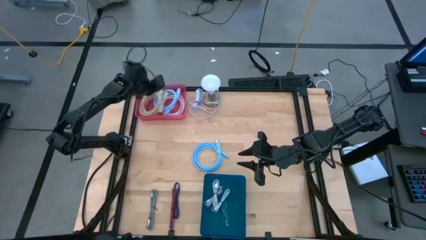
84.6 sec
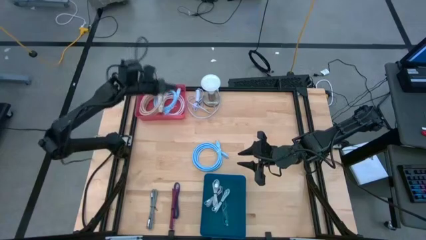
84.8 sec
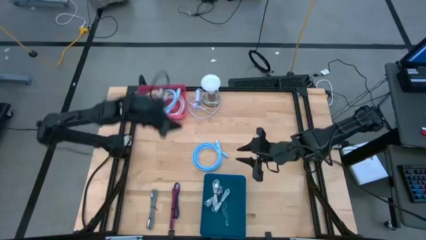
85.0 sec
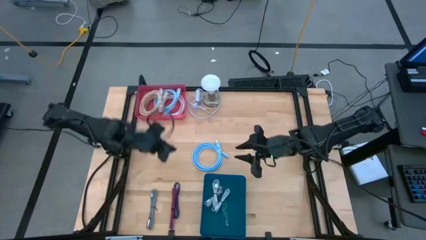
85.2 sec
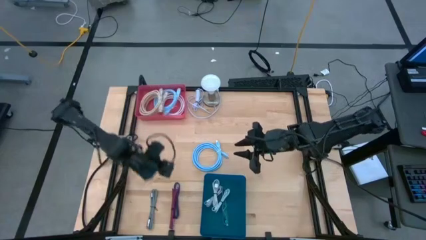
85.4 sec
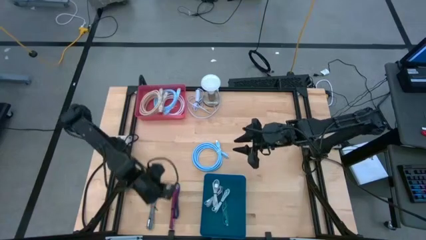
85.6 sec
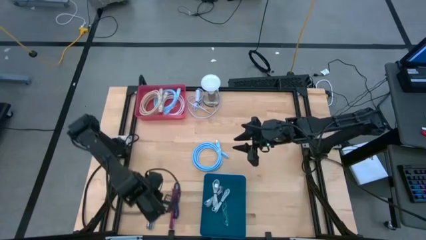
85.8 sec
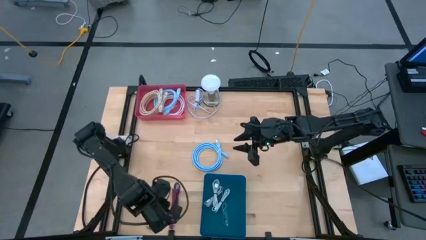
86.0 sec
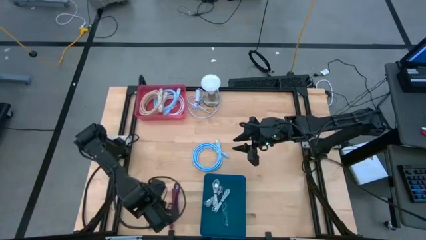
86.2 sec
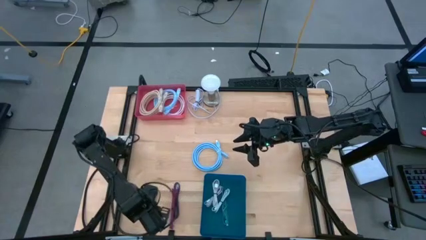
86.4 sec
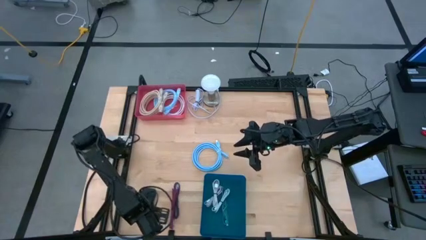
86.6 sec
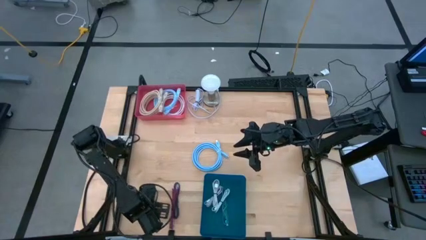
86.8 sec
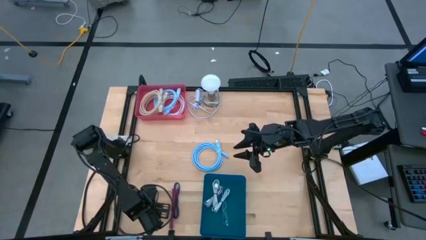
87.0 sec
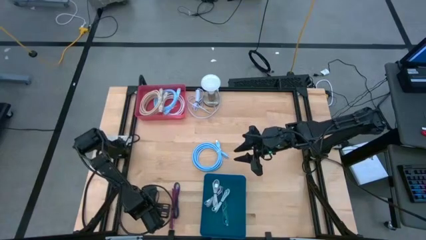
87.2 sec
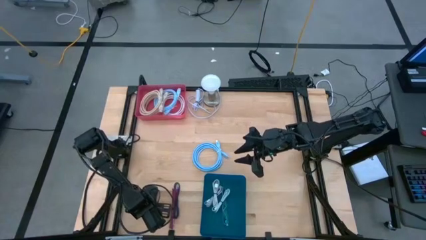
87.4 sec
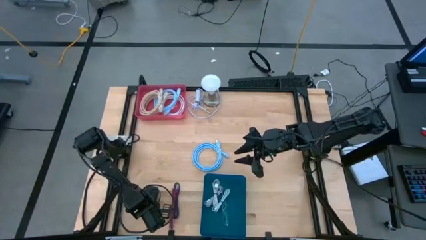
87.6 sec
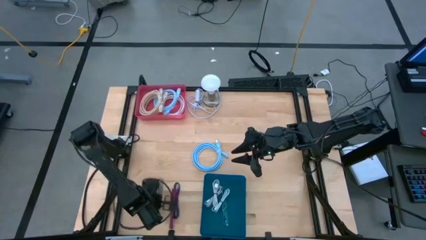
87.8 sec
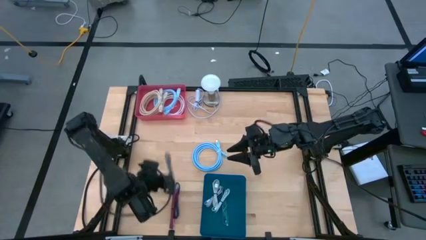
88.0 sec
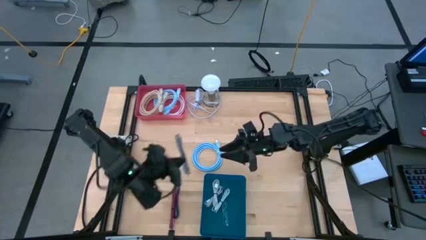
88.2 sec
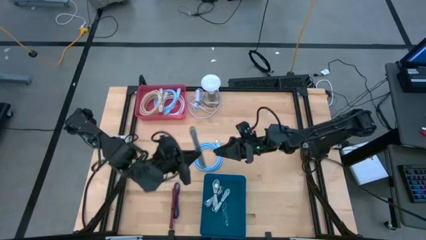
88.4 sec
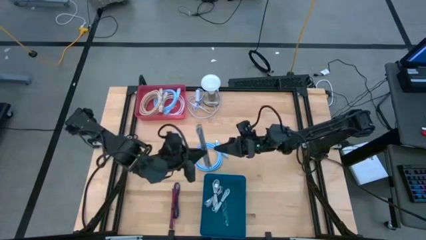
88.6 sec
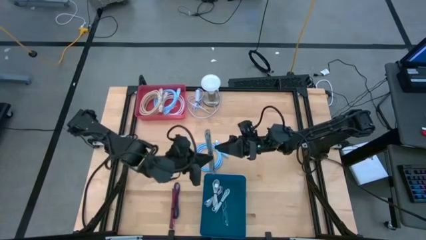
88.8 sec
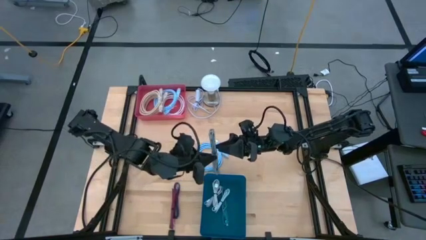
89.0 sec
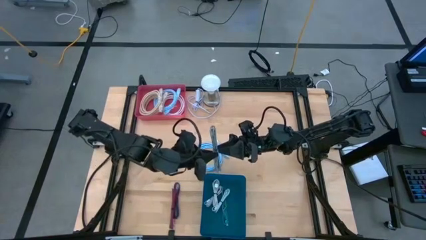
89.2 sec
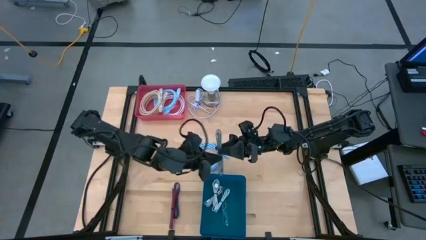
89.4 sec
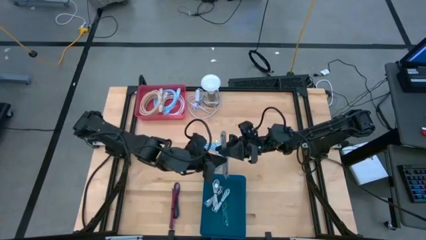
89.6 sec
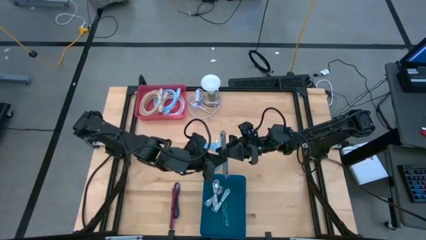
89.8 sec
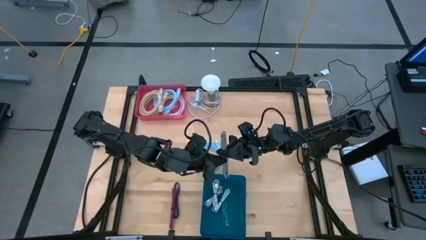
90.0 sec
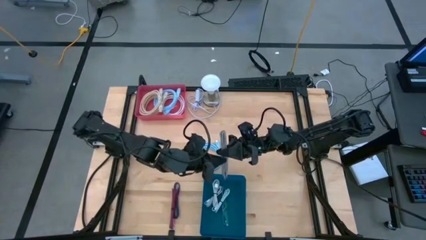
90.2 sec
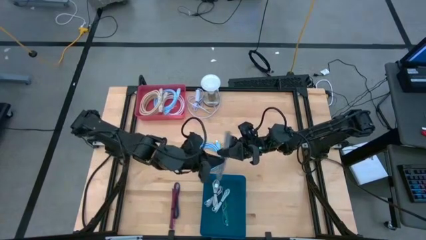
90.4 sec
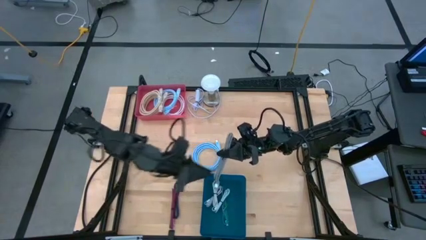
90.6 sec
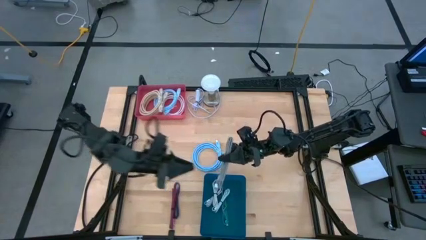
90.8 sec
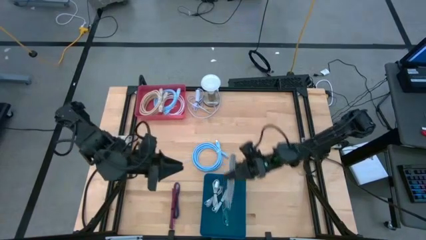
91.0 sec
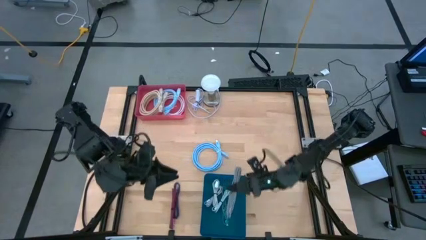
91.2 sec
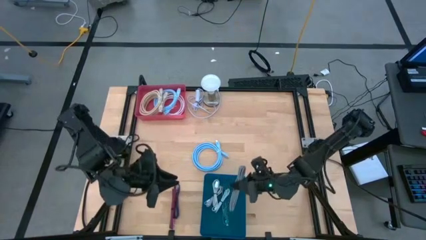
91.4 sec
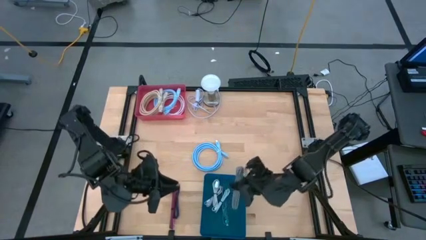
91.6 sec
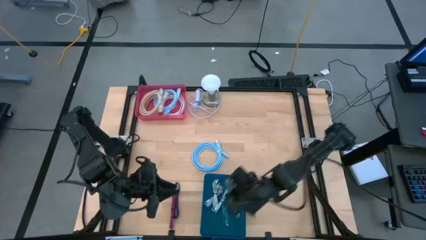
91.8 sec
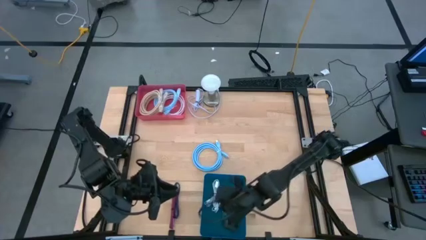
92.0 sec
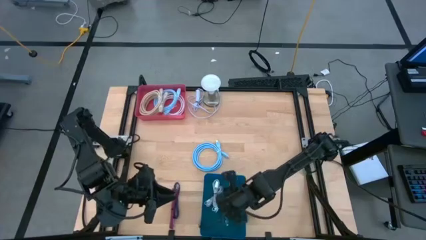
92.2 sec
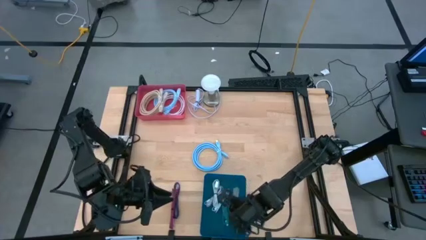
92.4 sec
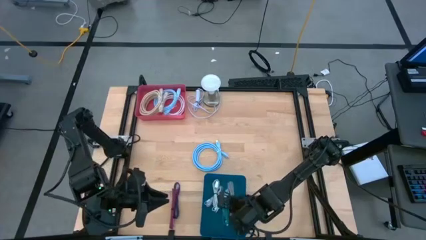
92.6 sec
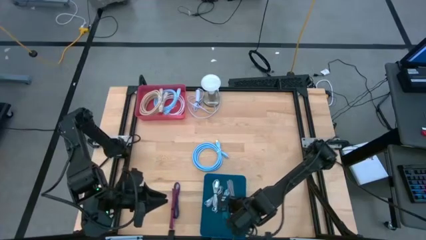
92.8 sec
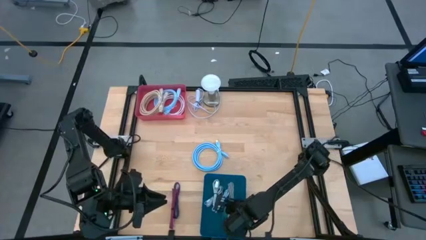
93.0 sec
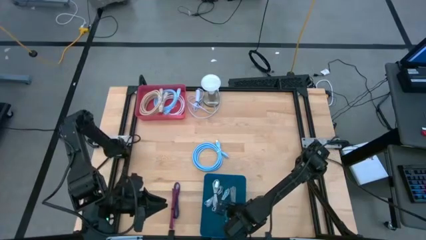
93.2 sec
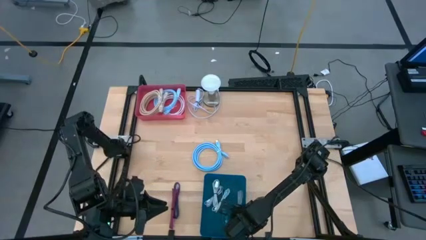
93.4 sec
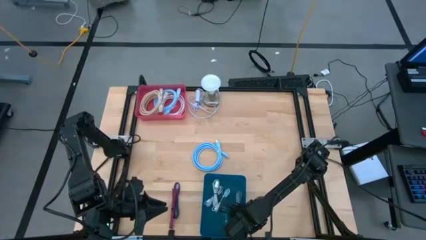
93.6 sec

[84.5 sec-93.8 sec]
Task: Pick & Place USB Port
Put the black USB cable into the blue bin

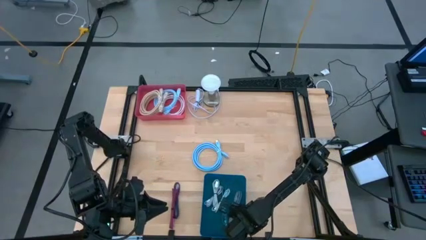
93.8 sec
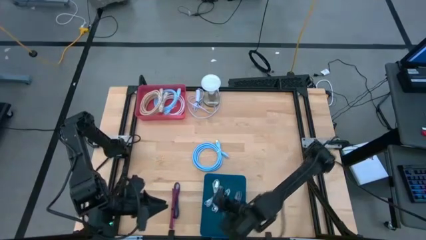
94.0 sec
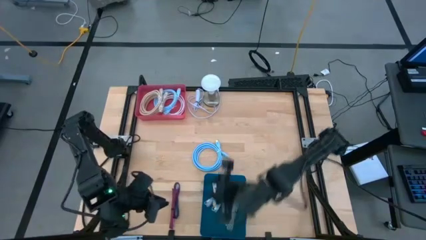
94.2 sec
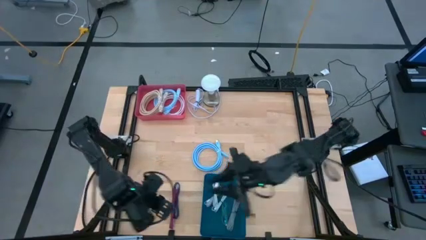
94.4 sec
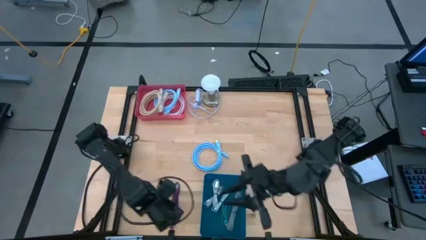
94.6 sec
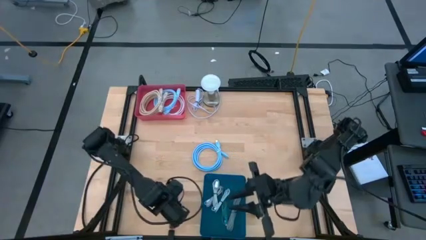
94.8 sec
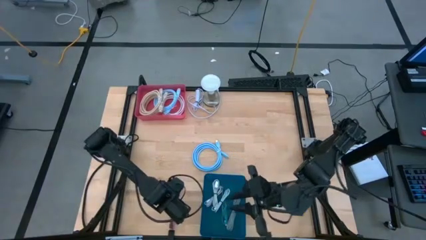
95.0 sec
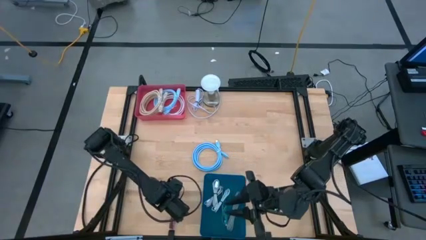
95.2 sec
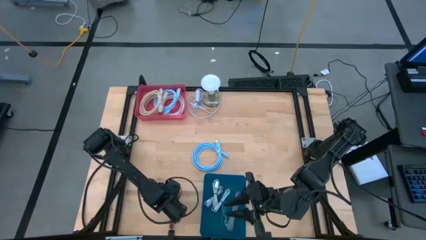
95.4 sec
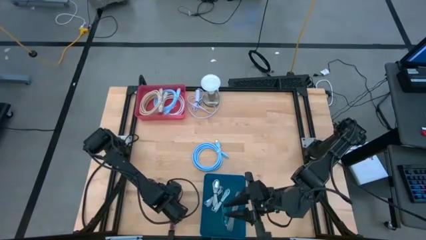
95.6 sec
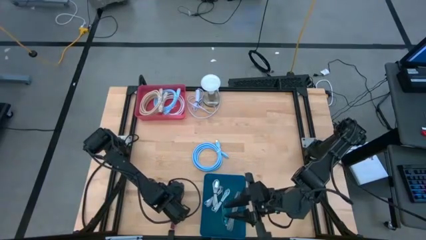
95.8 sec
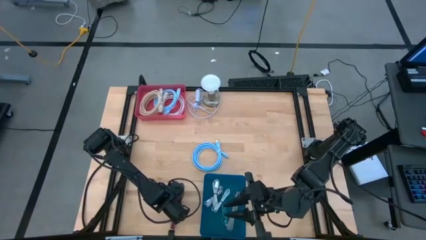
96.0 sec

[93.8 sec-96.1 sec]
Put the red USB cable into the blue bin
